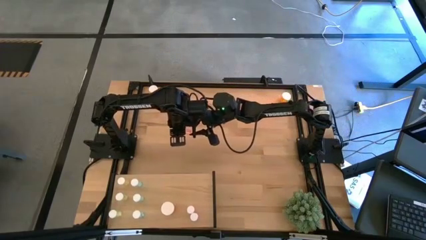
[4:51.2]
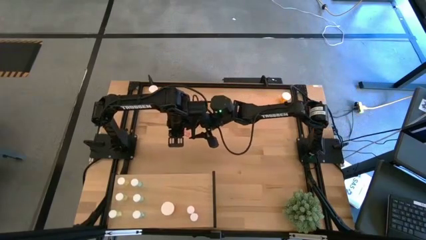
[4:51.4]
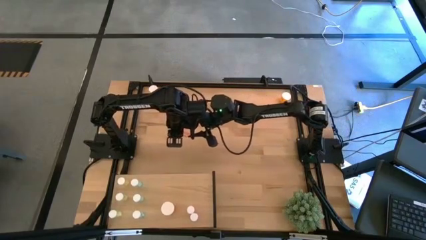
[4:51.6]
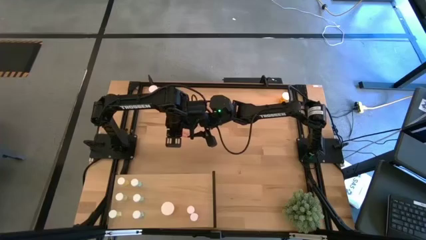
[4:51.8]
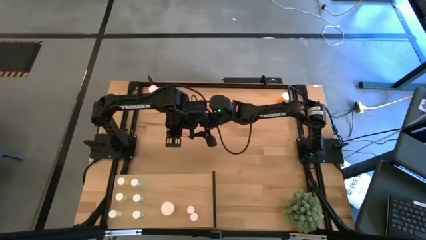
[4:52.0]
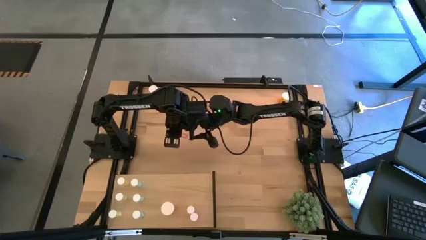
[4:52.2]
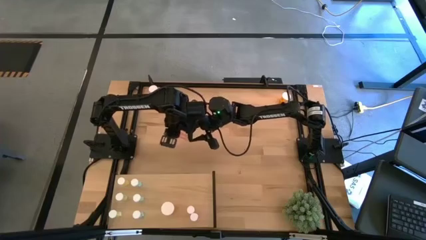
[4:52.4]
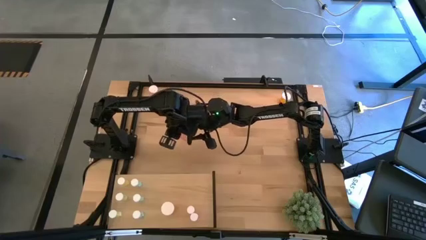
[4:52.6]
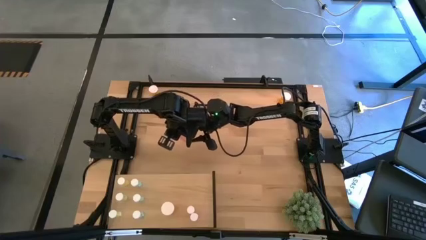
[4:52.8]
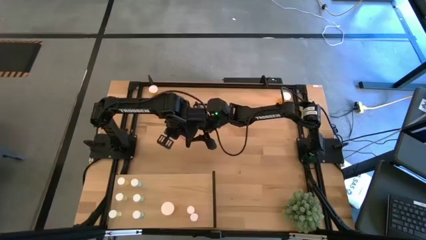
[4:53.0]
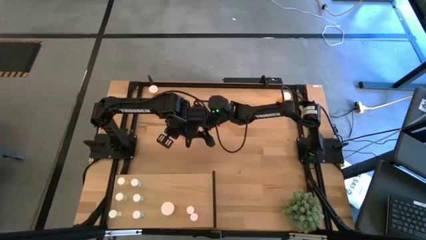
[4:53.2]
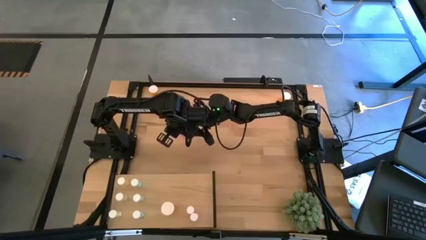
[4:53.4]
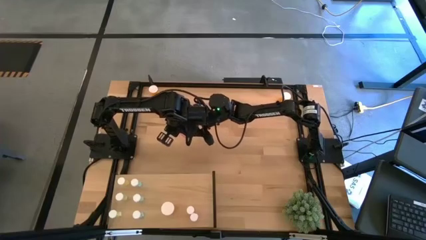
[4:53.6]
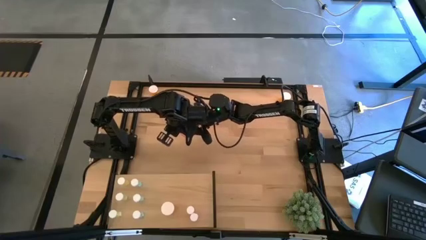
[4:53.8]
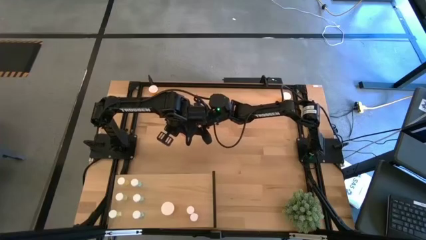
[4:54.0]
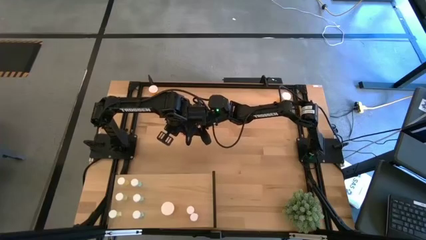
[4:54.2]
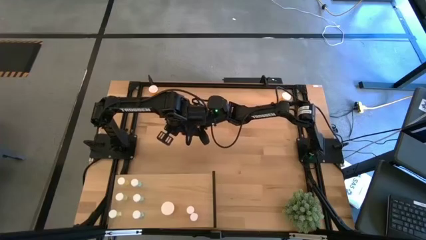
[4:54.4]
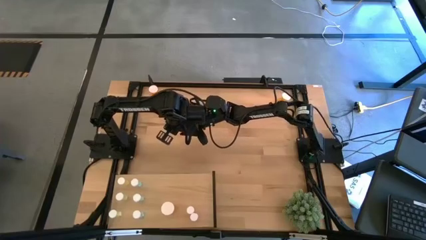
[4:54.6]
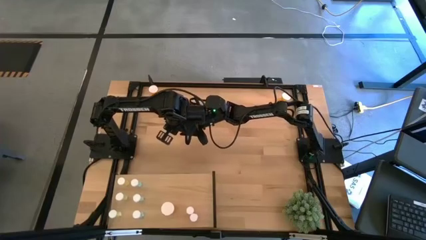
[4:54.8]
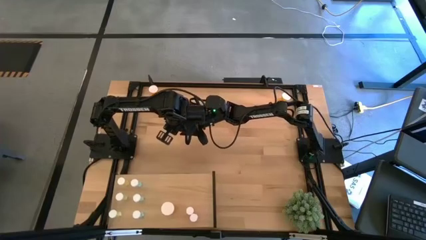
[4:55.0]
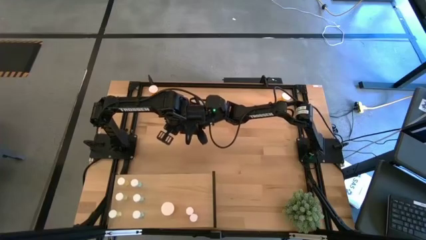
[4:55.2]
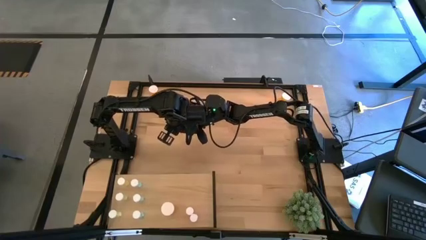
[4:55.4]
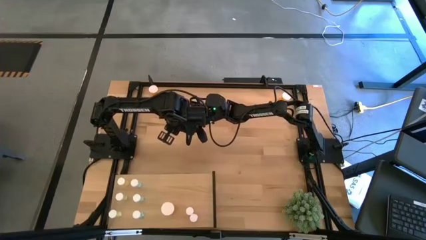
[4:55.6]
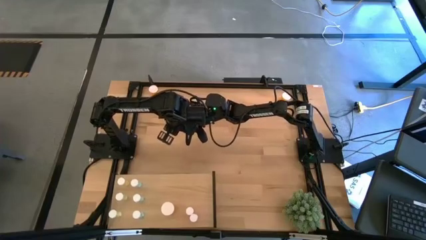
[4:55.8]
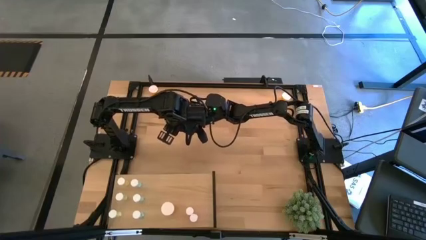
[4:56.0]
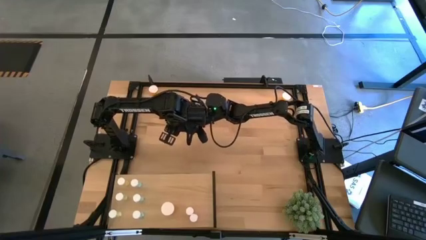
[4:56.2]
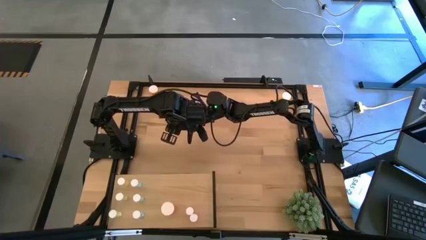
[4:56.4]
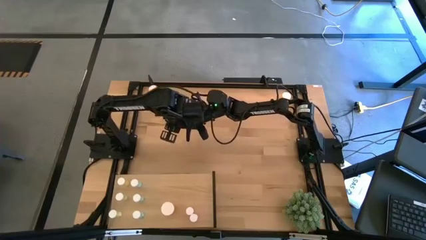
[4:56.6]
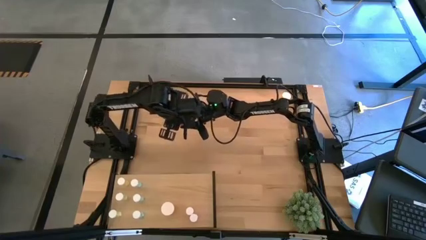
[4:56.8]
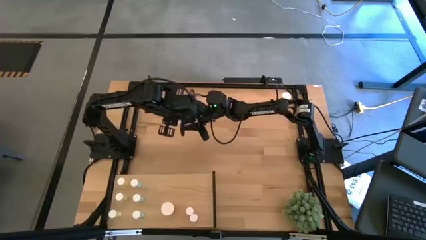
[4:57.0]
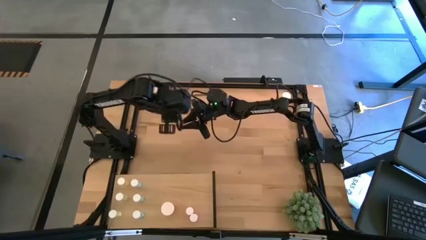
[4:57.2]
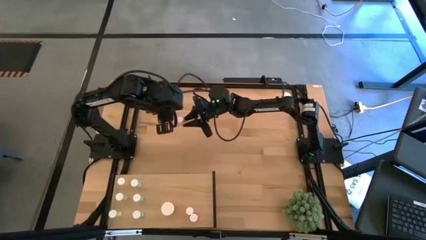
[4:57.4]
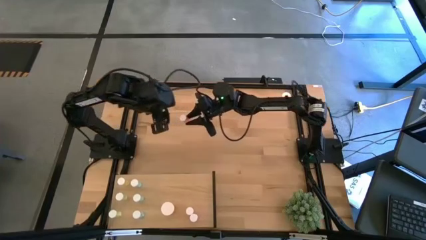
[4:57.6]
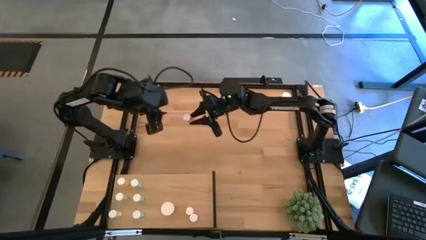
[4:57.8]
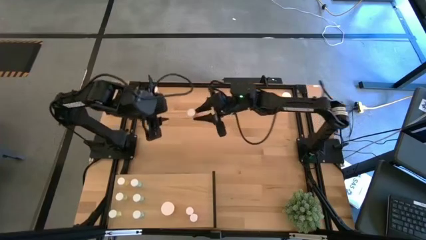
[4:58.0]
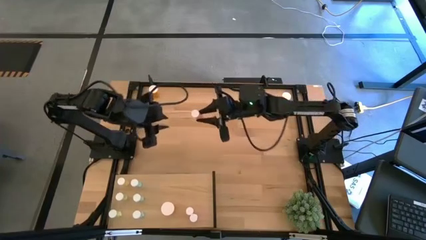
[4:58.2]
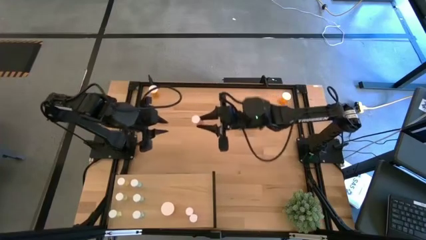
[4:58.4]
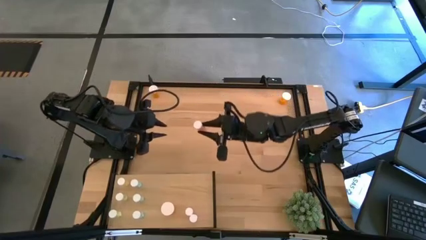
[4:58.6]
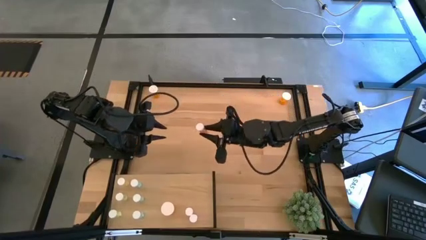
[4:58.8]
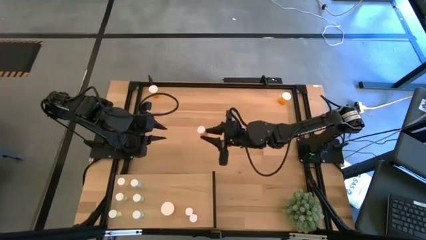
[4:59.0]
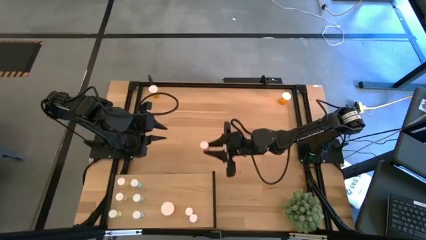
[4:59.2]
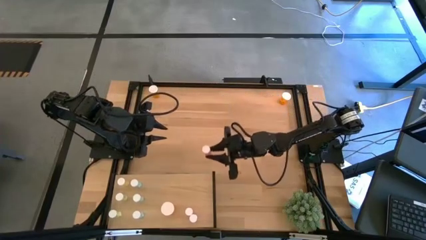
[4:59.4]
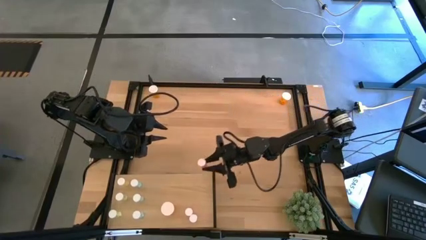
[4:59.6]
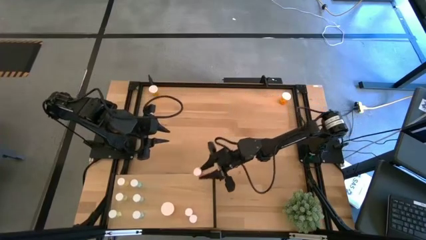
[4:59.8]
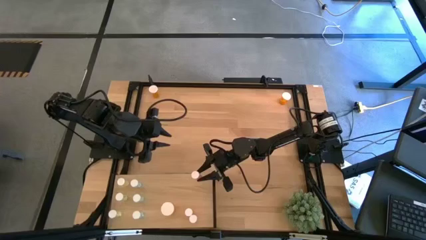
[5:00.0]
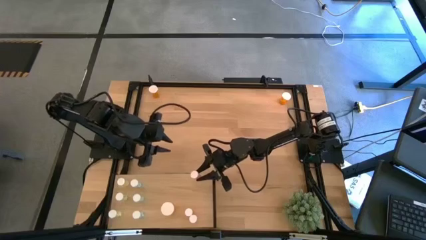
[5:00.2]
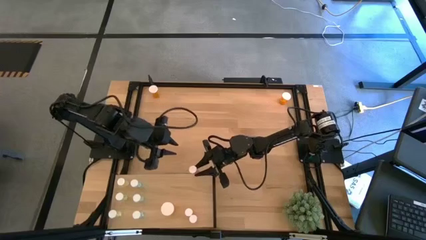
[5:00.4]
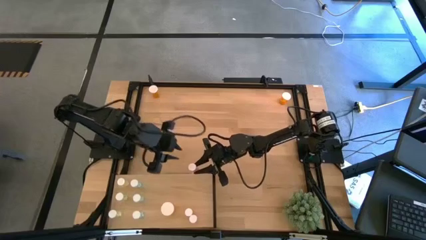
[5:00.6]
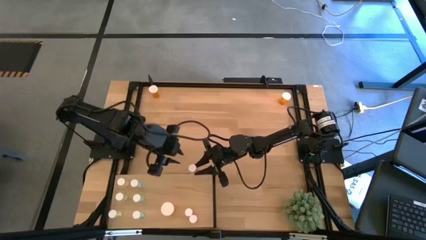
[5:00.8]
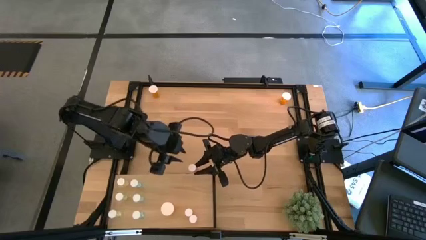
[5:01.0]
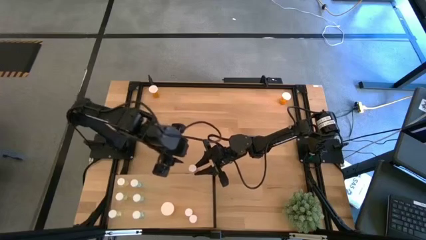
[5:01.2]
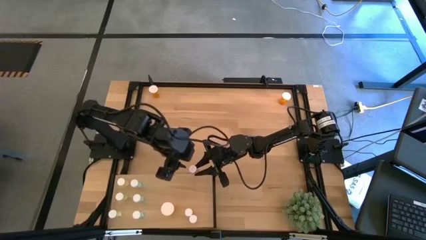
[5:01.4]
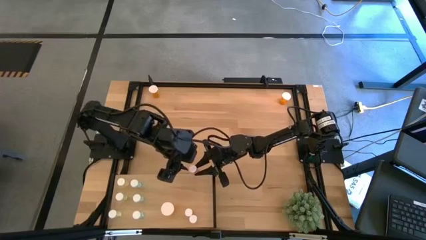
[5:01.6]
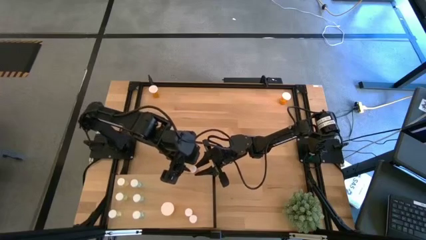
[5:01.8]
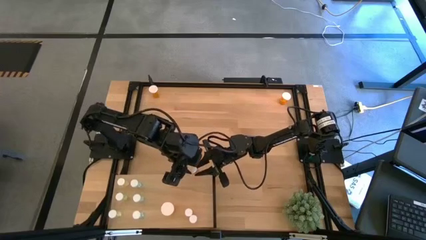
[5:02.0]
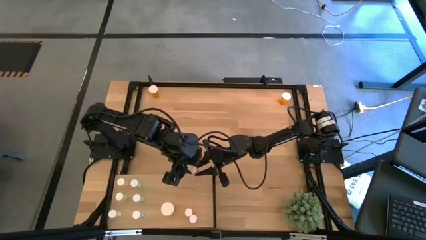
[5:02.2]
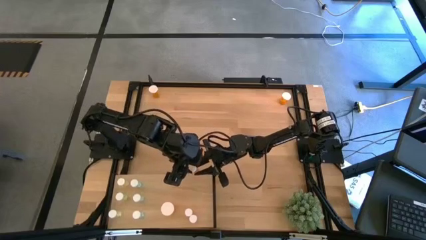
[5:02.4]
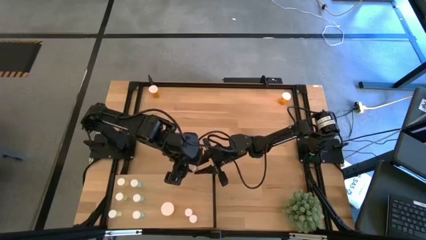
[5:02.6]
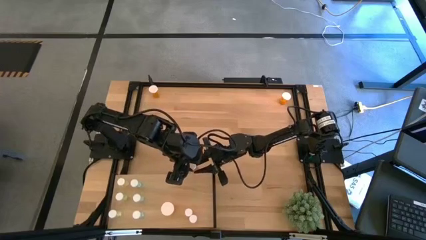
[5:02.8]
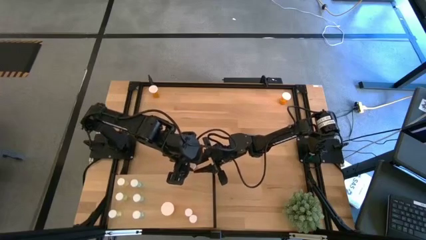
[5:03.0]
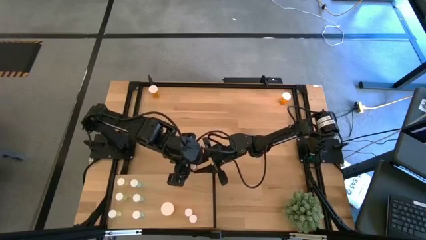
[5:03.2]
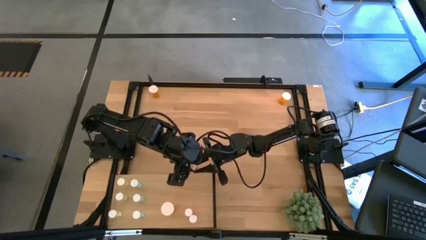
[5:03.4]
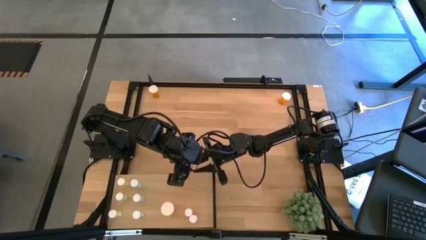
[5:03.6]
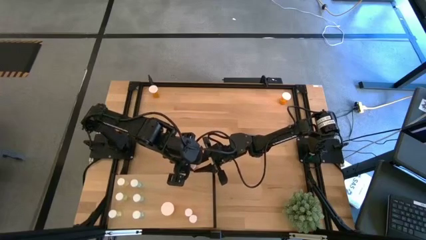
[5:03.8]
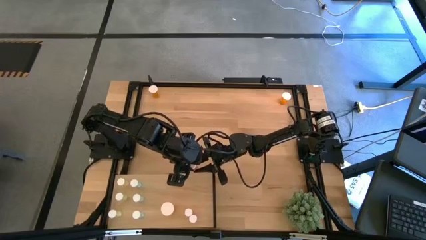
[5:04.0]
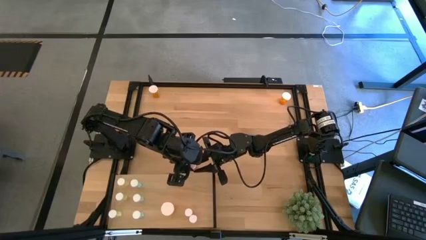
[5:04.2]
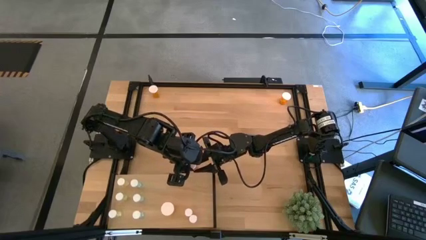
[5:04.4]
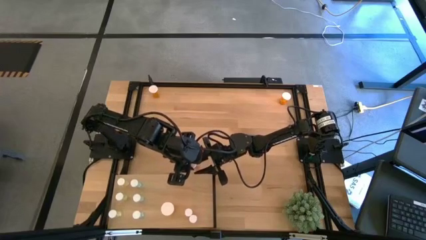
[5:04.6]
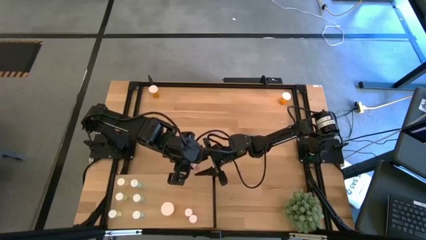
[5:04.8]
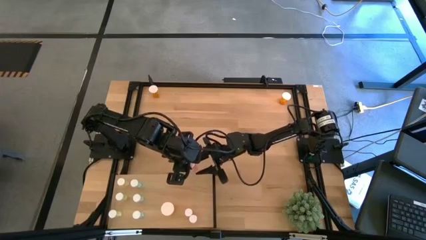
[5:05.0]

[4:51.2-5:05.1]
Task: Pick and place medicine bottles onto shelf by color
Put the pink pill bottle on the shelf aligned with the other pink pill bottle

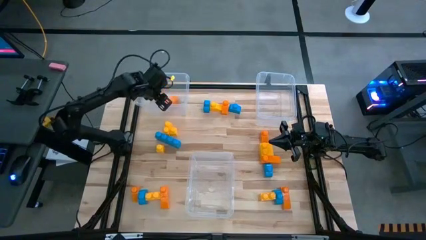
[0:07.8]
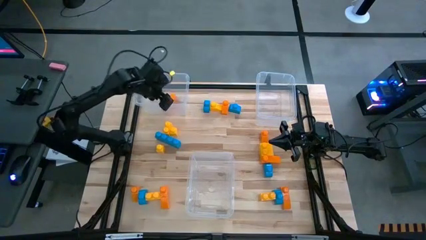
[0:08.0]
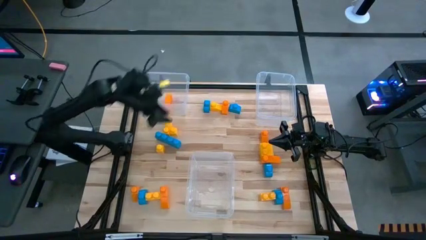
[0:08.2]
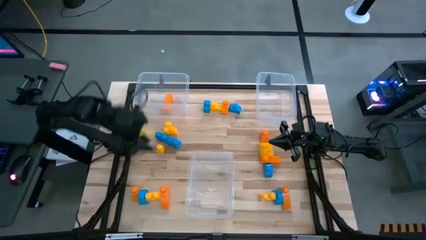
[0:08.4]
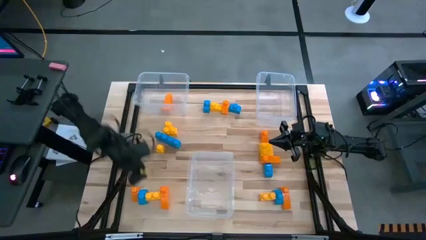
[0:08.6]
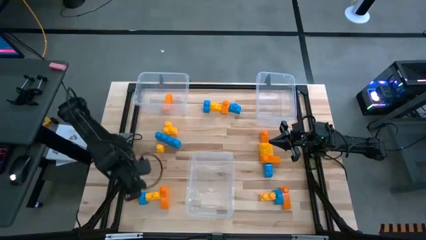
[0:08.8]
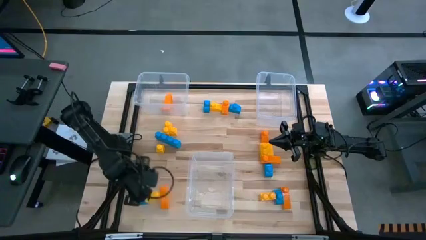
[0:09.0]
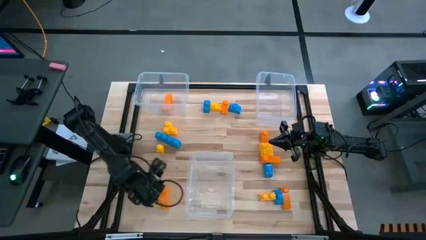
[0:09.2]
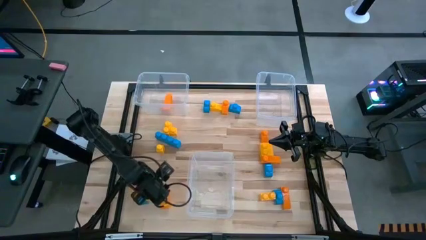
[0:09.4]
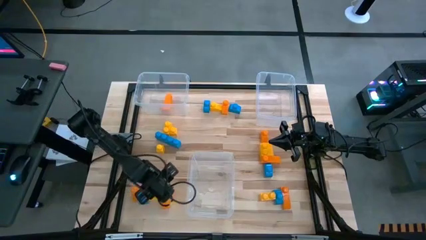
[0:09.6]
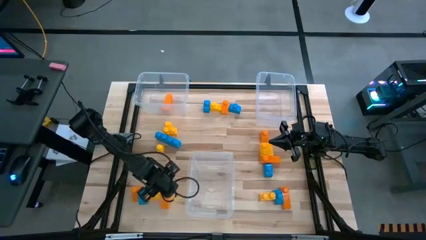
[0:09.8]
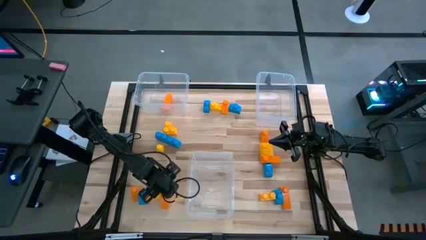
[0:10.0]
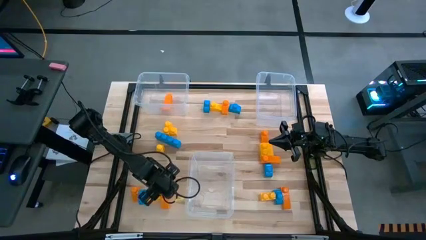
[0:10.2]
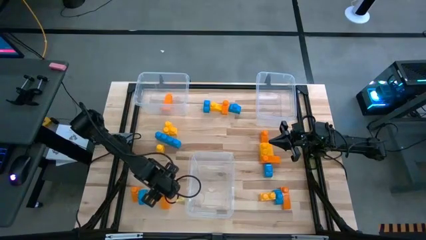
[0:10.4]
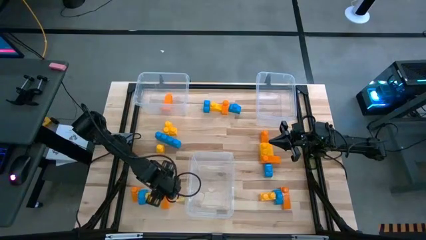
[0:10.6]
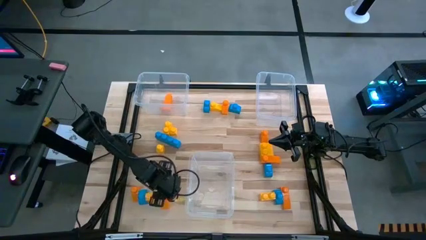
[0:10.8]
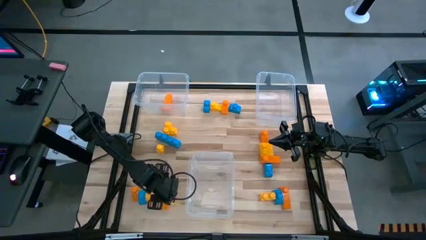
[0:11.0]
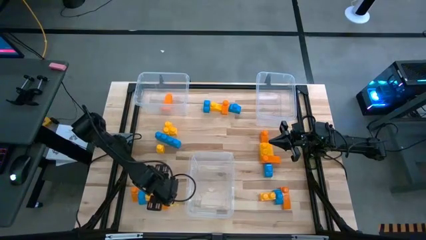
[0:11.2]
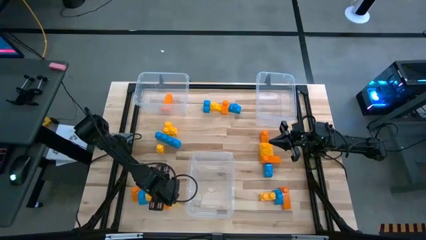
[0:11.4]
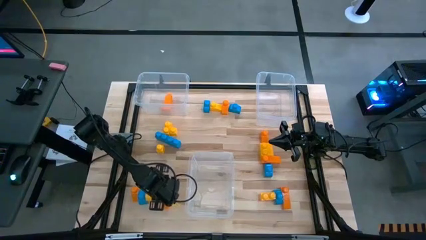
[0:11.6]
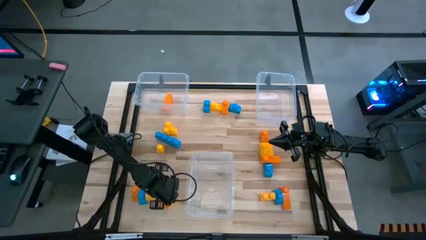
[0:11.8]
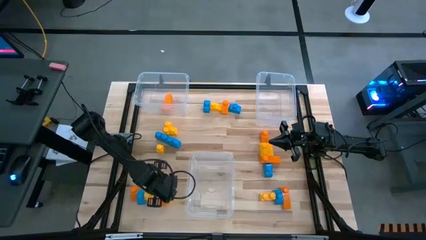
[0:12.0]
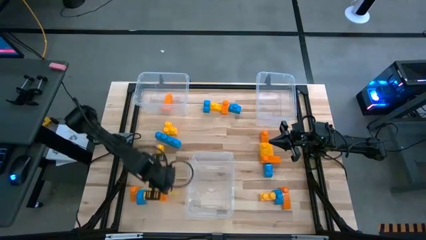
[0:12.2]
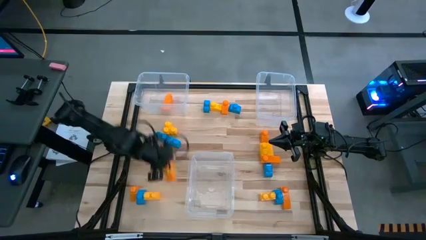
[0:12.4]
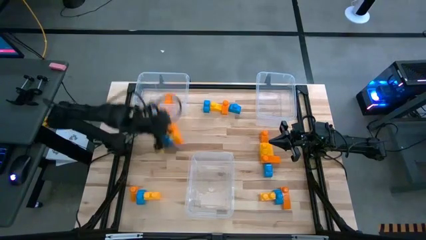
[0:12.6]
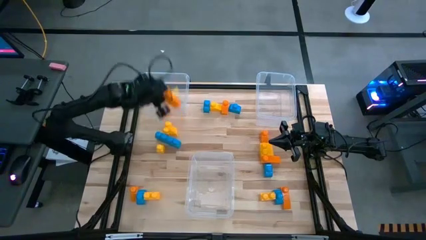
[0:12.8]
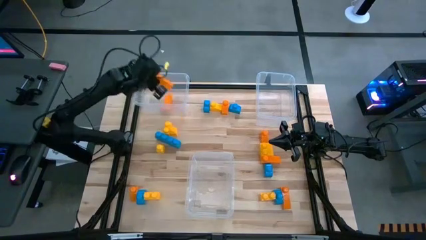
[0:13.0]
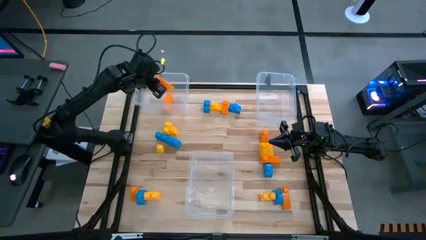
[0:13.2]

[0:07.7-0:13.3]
Task: Sort blocks
Put the orange game piece into the top left transparent bin
